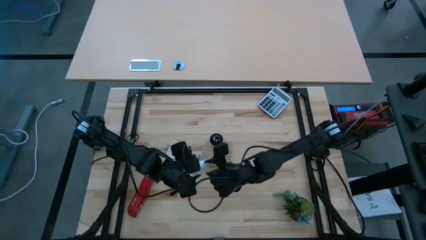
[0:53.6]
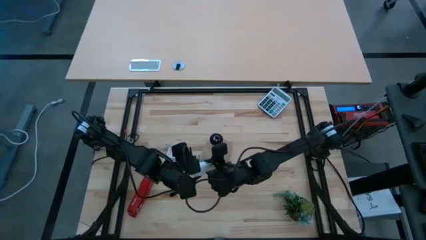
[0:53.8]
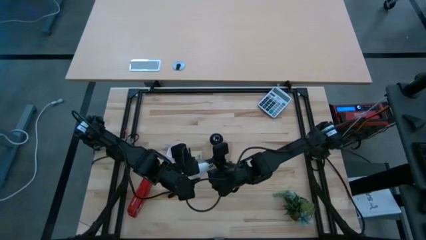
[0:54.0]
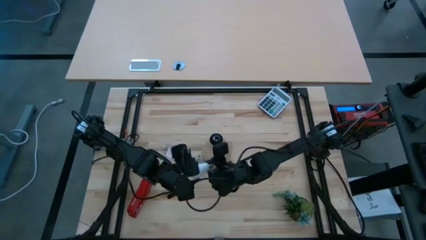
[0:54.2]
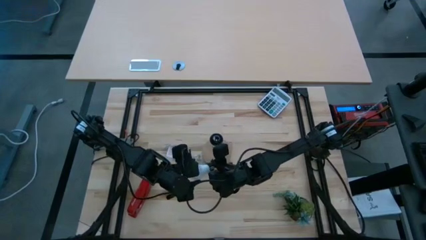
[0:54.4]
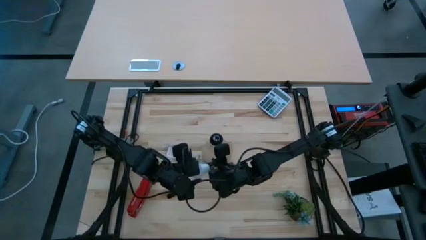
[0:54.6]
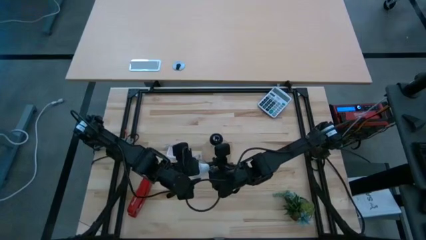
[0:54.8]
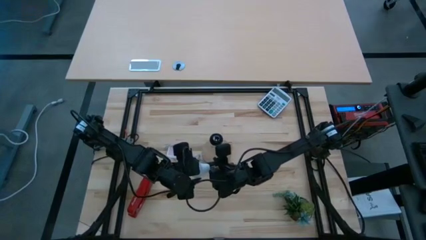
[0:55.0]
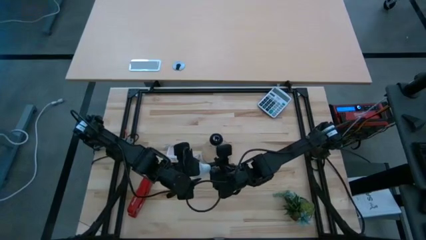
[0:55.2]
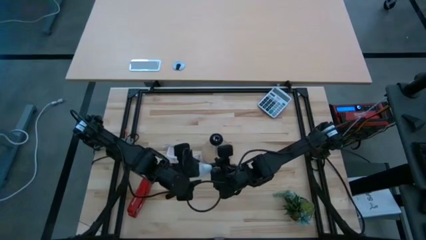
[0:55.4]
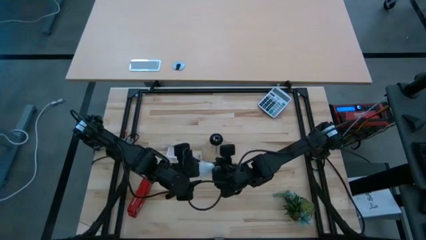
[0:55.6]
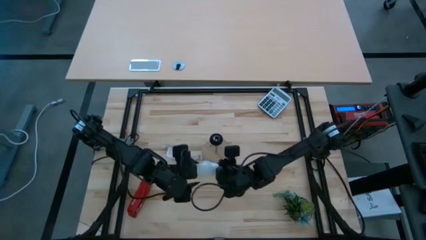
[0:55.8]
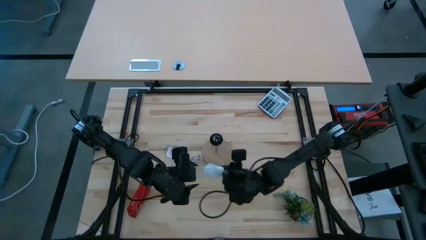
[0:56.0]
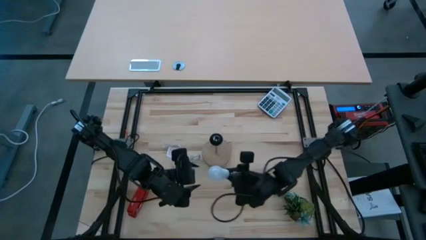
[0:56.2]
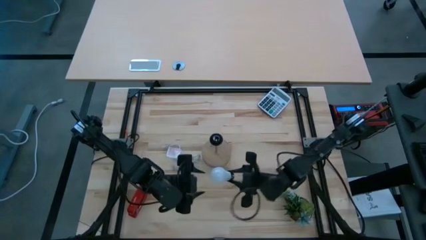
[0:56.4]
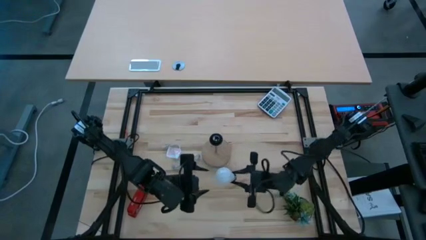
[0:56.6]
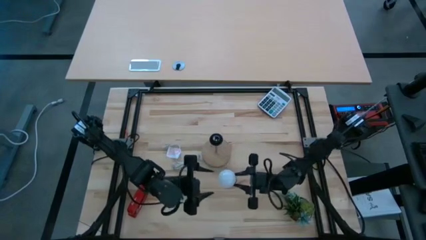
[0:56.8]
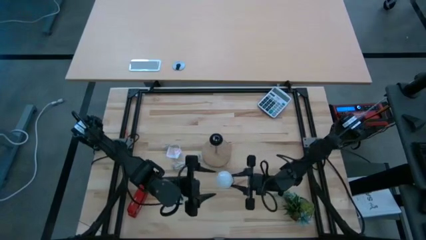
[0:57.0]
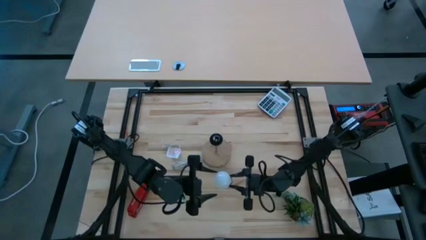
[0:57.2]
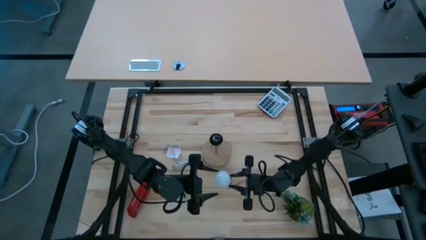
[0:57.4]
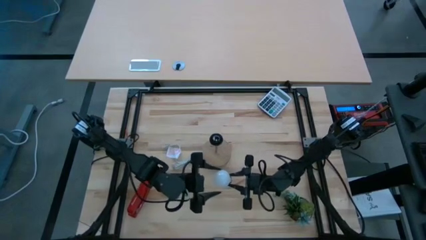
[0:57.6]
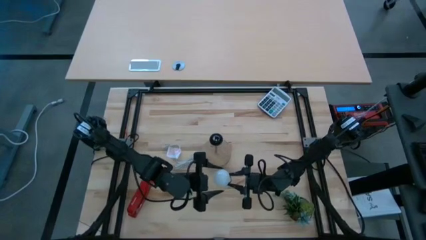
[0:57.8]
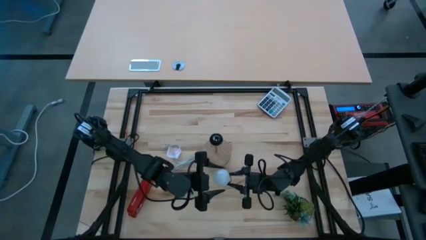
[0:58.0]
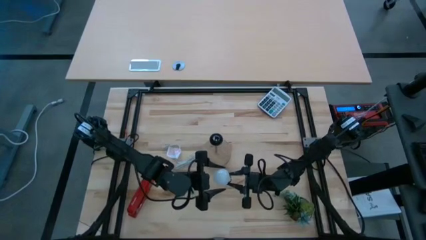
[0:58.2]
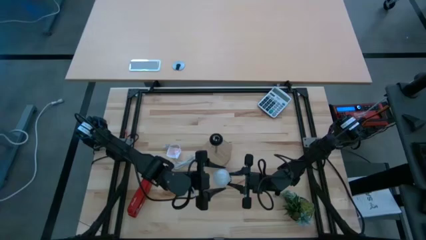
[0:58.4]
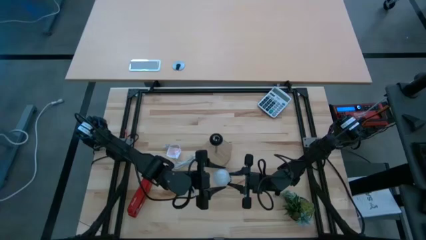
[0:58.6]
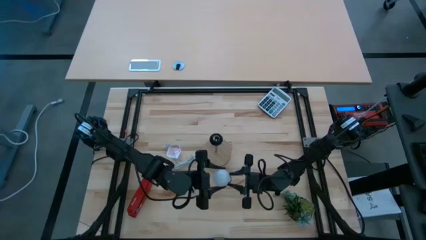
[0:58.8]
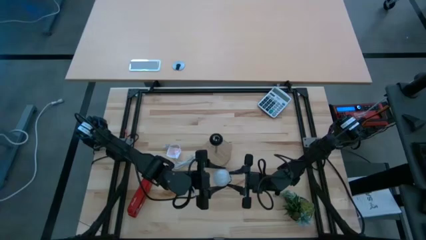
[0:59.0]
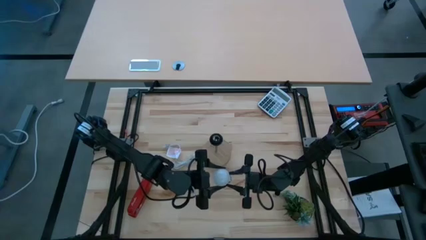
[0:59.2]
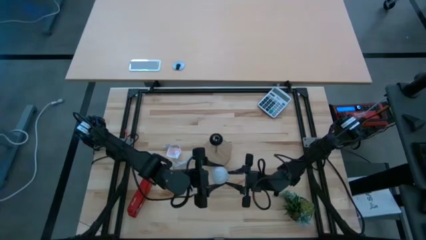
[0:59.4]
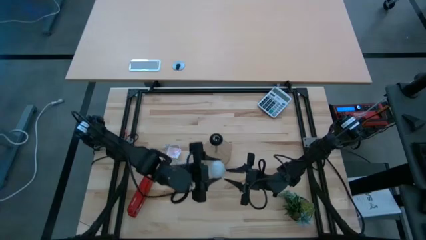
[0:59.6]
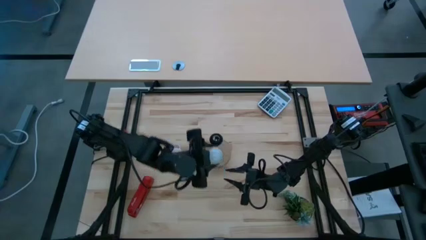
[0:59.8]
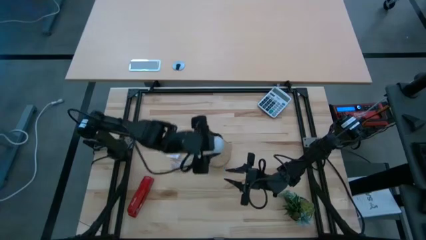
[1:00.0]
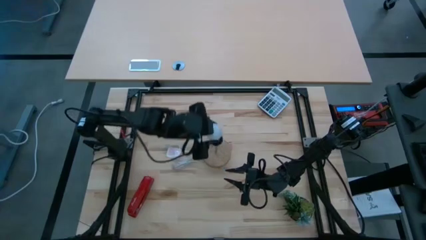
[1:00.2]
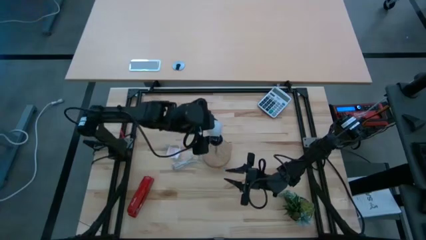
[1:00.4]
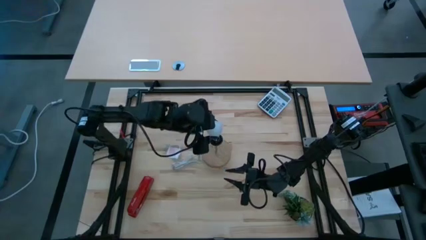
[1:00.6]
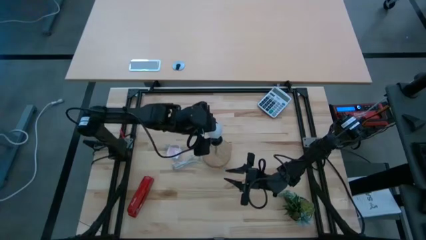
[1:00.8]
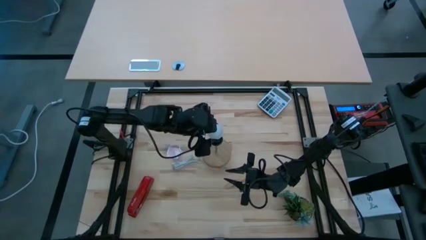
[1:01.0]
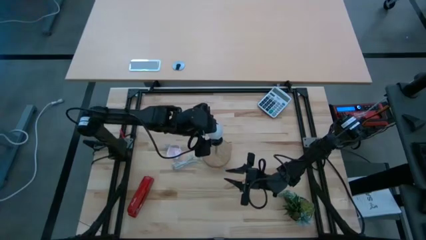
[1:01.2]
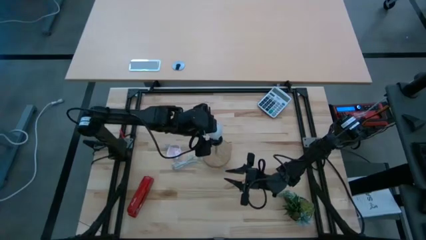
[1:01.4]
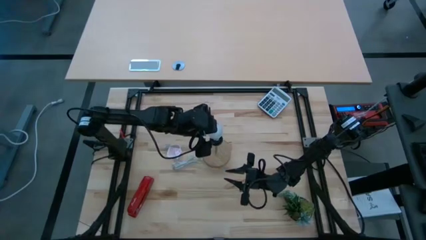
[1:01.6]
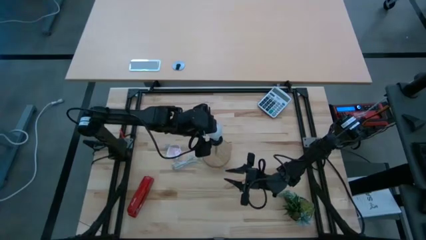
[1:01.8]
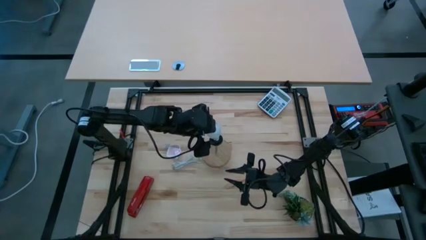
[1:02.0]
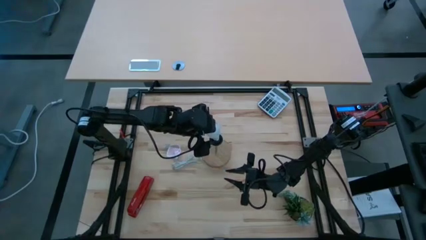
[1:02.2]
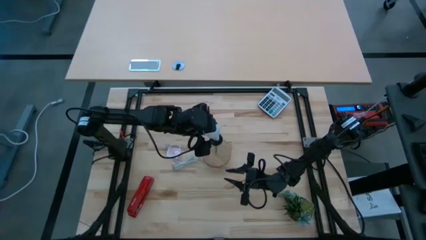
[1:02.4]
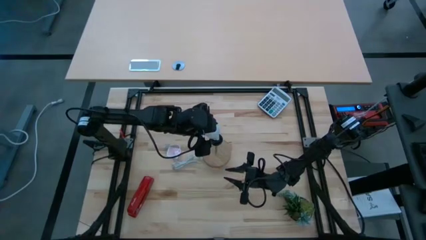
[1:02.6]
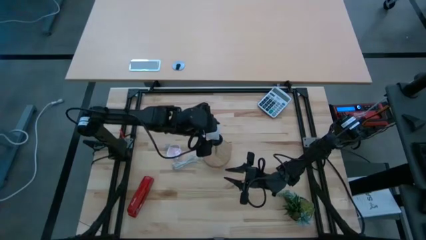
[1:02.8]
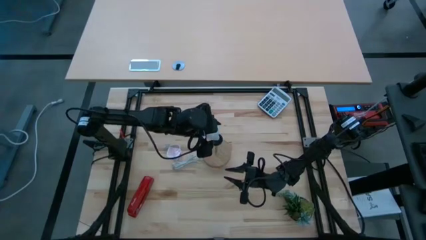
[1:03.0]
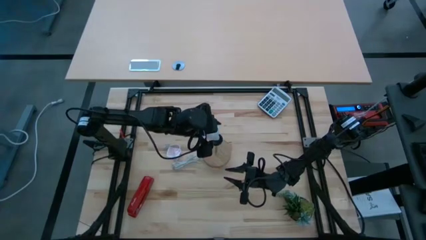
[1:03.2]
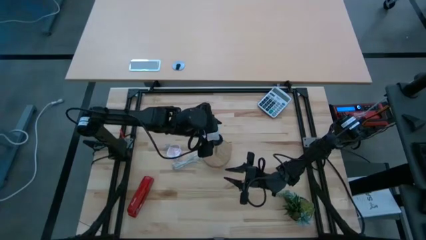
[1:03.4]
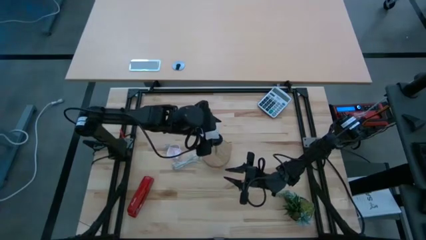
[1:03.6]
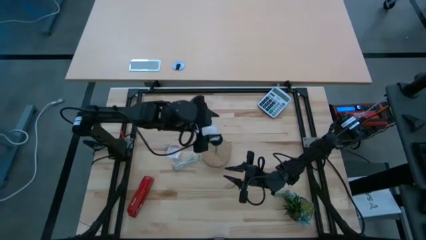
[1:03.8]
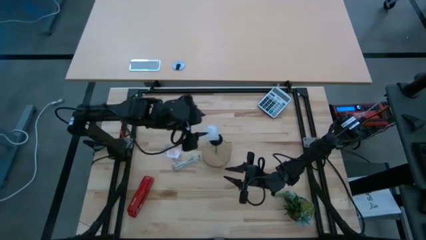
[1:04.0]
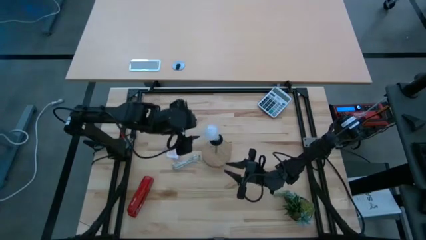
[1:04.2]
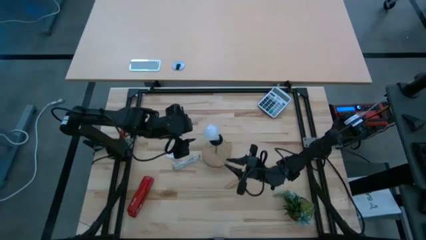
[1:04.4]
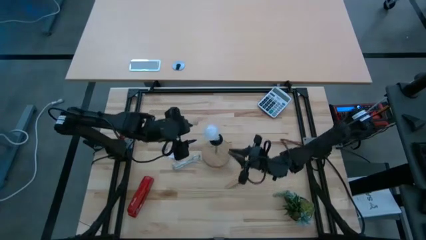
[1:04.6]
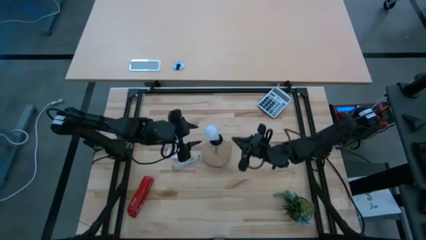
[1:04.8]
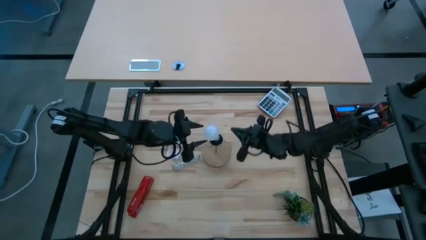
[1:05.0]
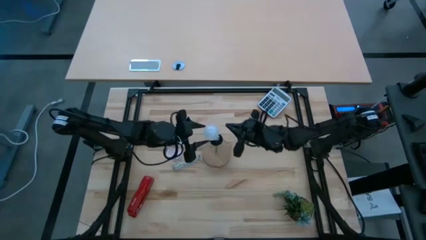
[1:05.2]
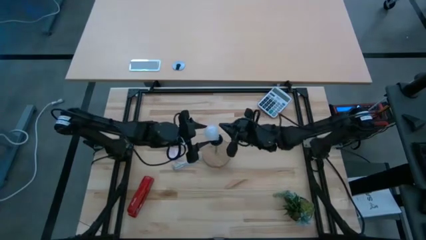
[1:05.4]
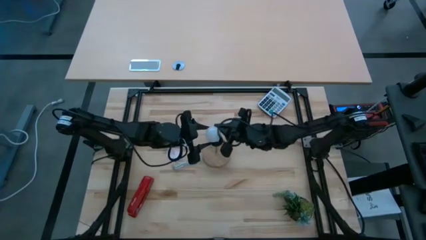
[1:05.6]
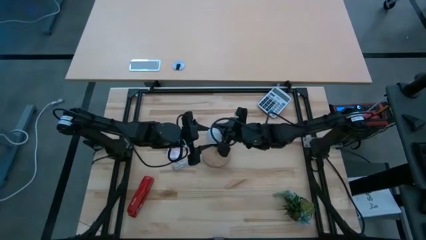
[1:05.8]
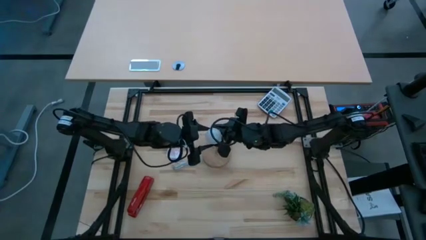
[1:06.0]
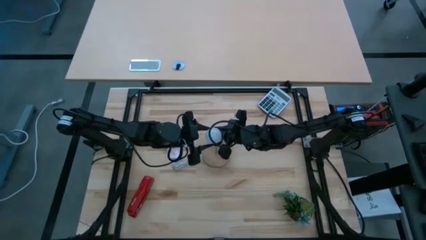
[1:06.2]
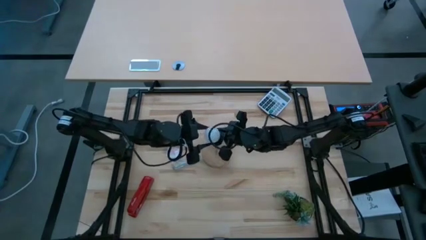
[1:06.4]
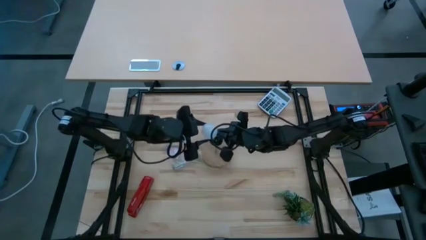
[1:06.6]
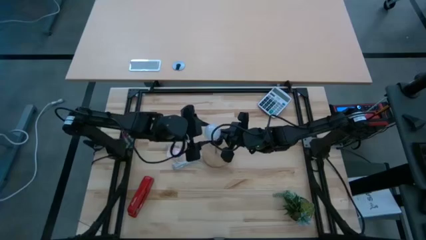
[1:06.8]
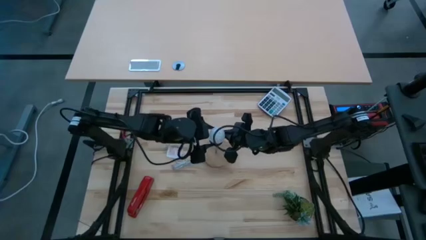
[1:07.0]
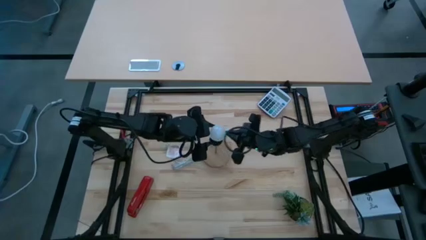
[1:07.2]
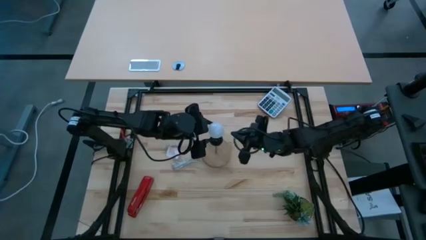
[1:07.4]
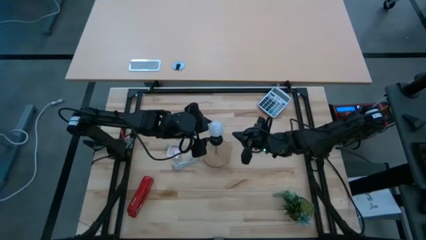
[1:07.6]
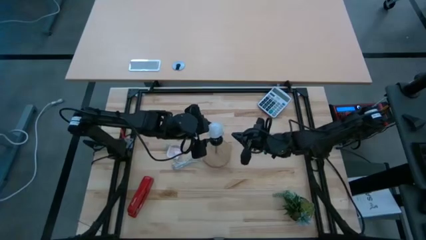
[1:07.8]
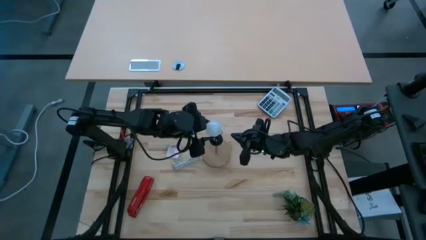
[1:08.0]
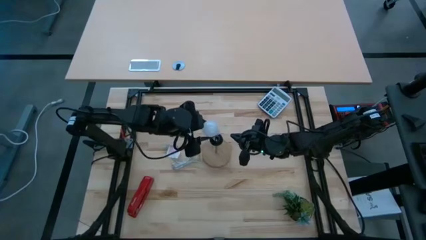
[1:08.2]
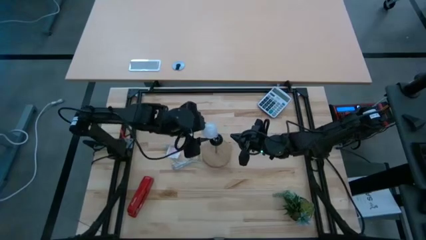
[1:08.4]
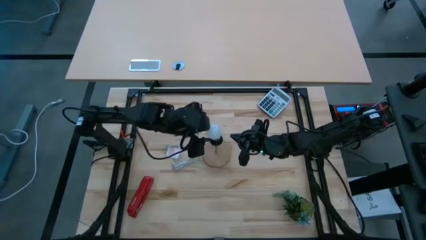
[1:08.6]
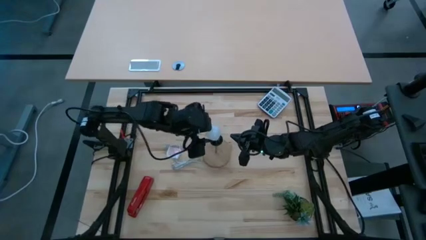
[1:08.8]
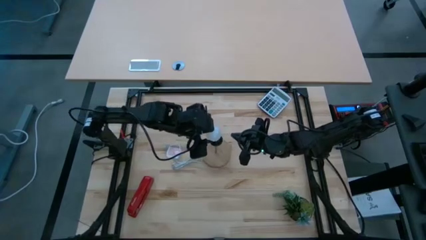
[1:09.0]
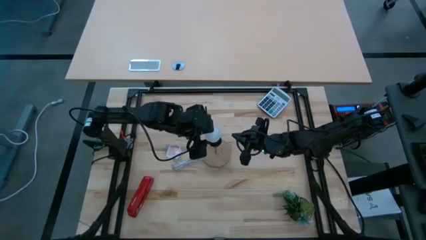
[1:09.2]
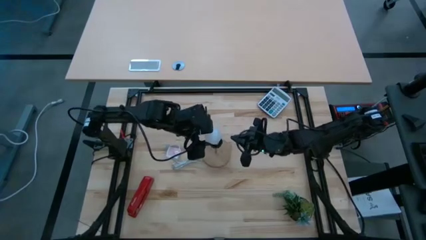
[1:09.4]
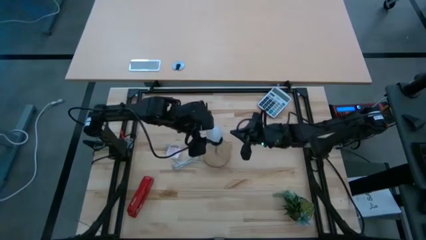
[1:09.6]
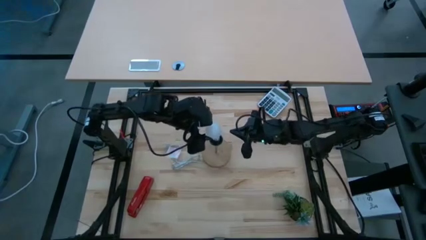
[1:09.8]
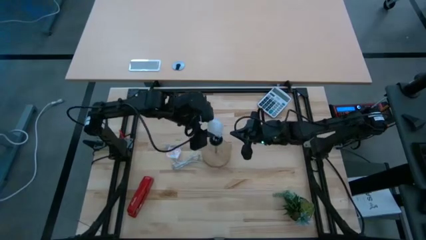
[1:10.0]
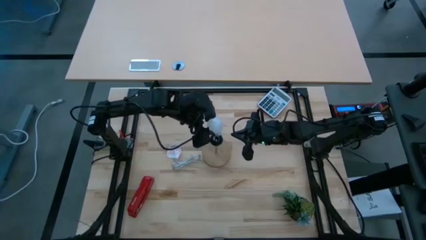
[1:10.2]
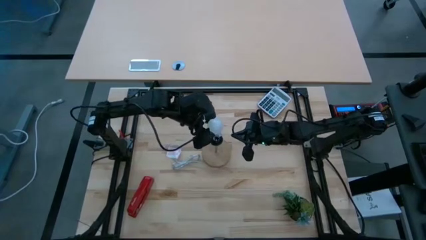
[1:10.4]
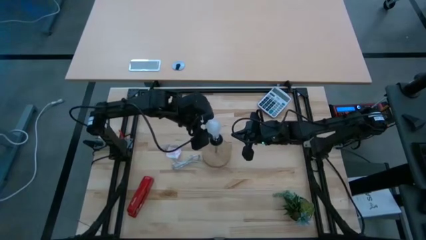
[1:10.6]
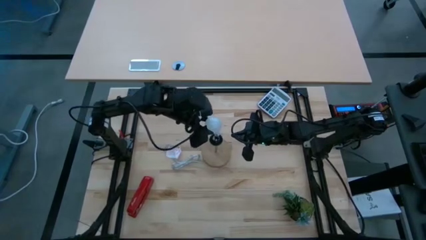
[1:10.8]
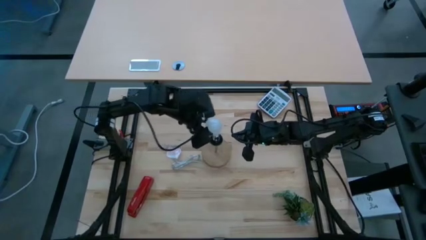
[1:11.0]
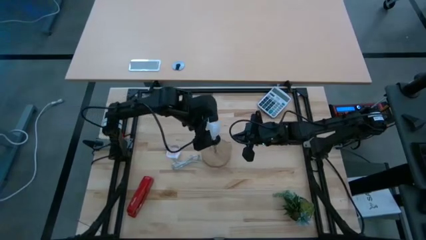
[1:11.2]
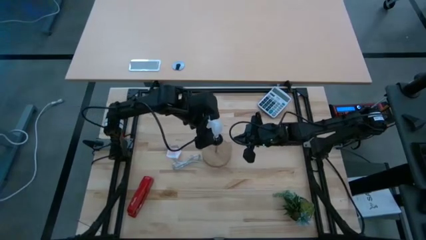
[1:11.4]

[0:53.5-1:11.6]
Task: Screw lightbulb
Insert the lightbulb into the brown lamp
